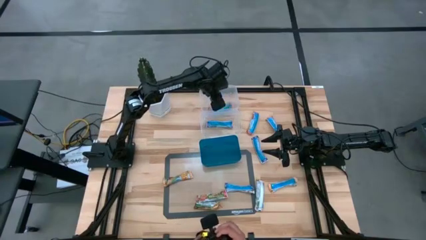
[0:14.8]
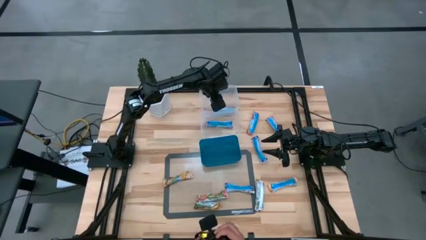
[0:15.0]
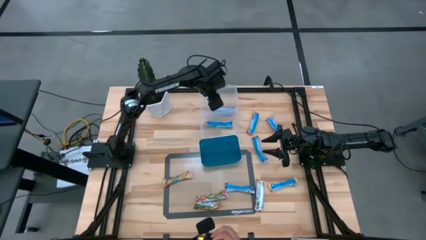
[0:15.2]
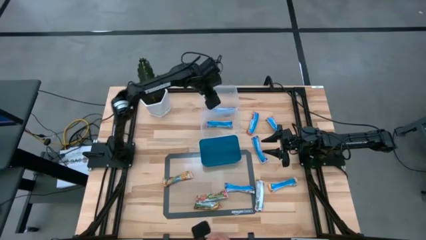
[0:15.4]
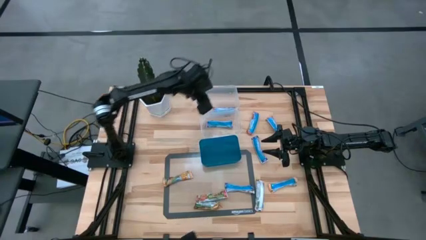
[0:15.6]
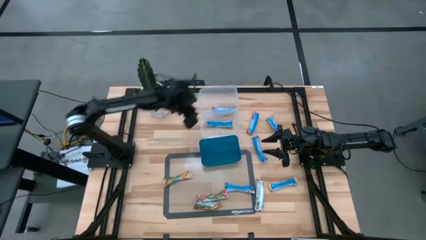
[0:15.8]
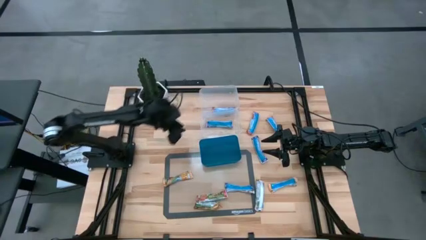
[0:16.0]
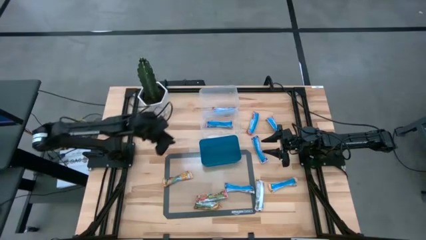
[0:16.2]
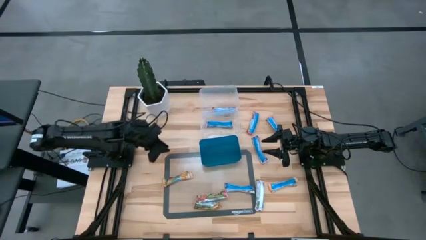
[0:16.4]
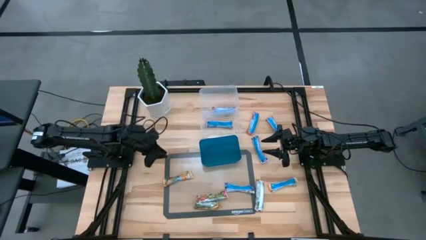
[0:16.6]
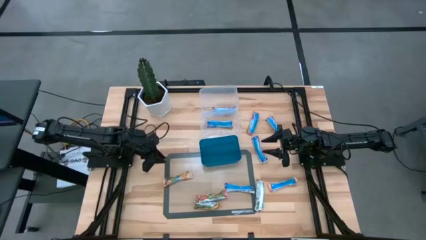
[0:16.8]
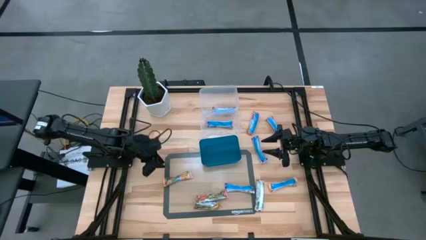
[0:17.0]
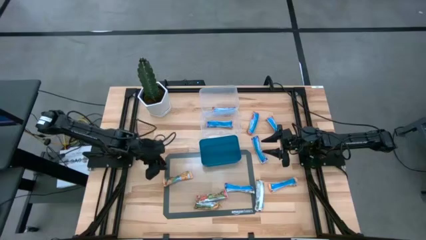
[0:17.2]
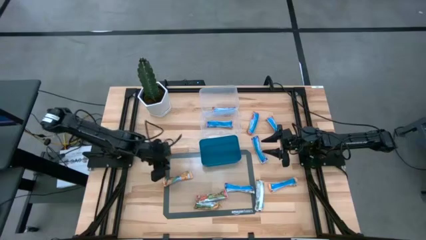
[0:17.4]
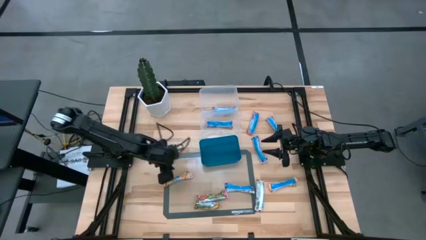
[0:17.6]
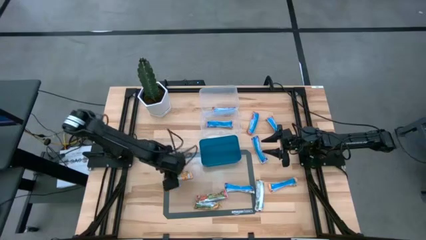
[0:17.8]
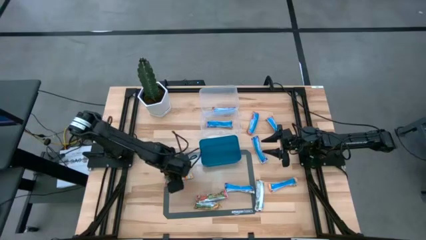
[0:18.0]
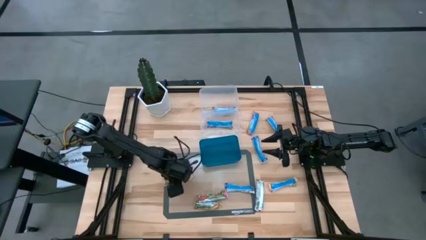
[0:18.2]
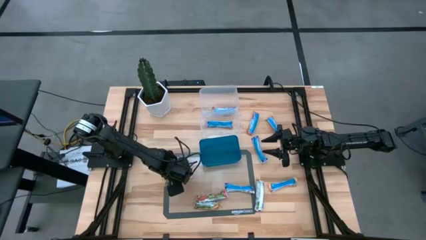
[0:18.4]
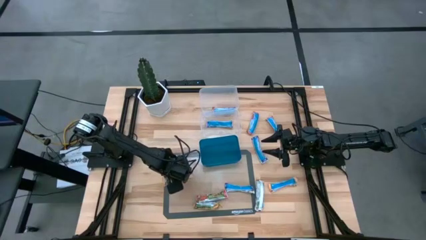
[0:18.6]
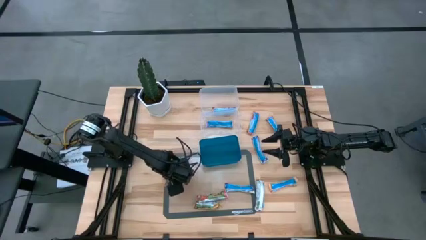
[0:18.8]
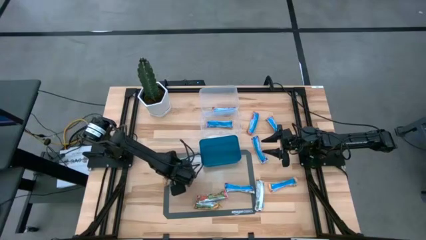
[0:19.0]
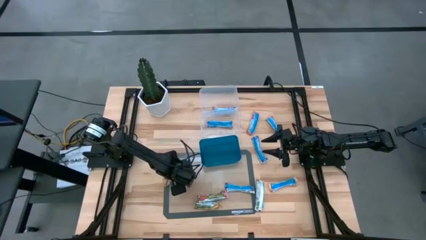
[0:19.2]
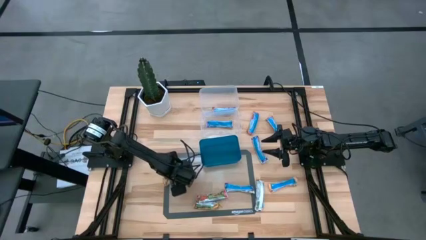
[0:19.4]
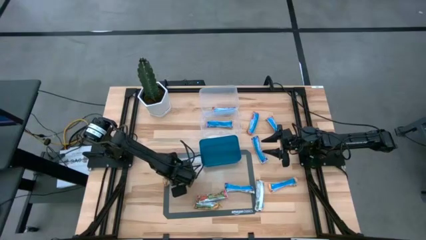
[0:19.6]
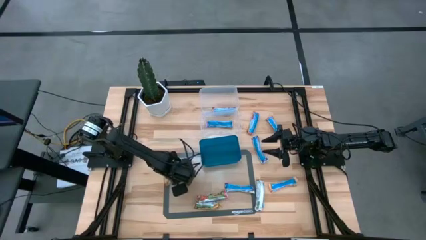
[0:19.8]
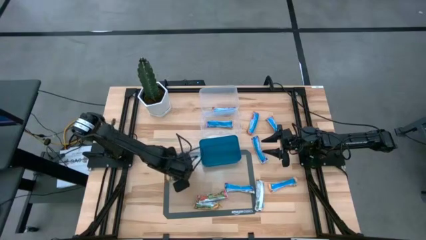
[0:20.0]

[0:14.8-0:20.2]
Task: Pick and place Granola Bars by type
Put the yellow granola bar into the top transparent bin

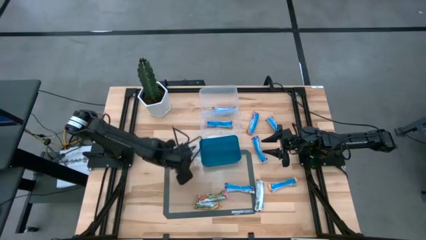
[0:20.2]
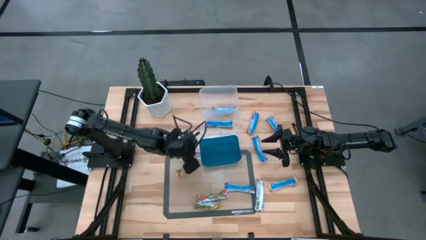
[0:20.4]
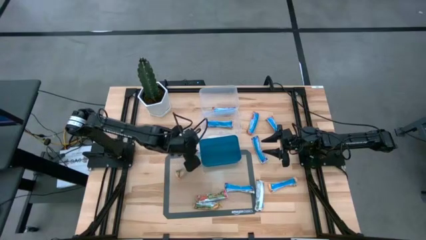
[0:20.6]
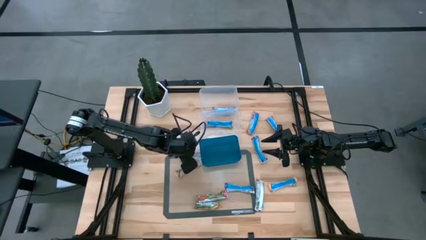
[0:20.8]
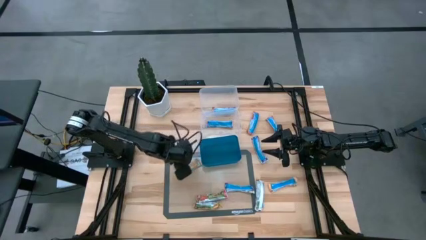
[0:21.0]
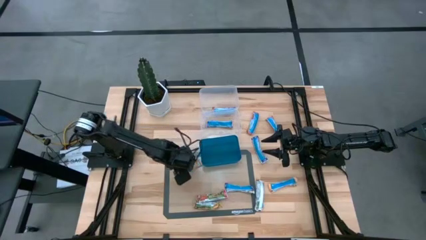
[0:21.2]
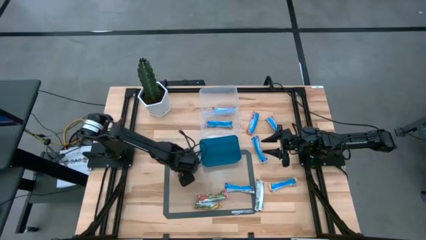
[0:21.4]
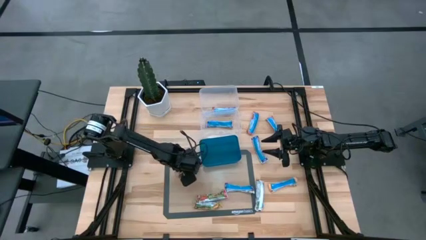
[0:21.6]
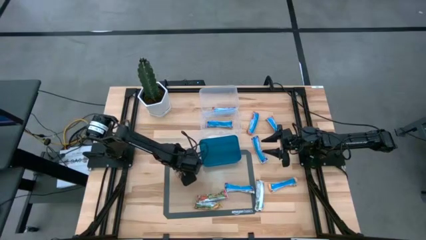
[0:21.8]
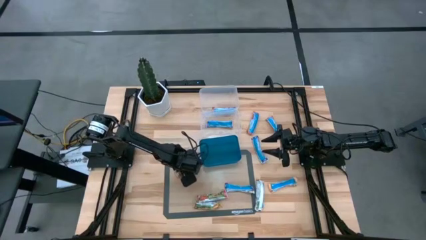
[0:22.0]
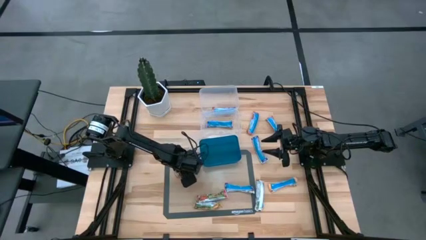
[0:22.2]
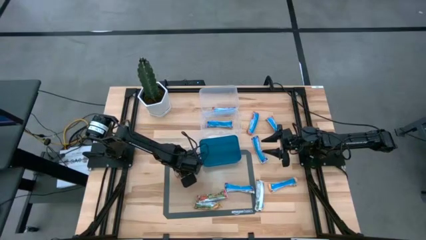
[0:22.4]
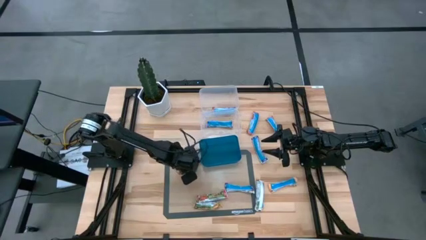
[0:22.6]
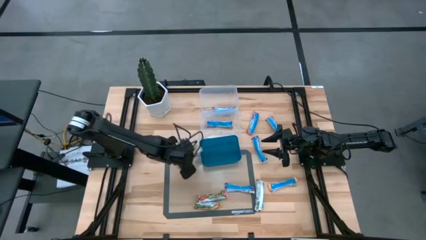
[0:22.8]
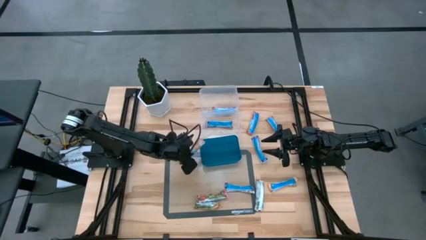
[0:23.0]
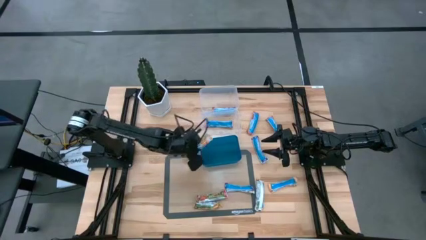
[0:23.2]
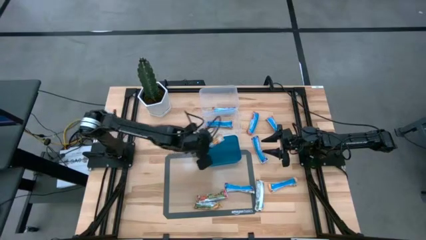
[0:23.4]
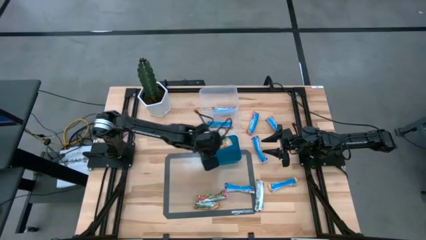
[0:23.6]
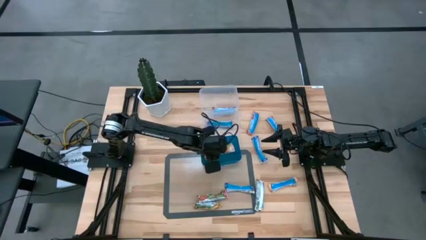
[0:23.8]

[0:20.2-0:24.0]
Put the yellow granola bar into the top transparent bin

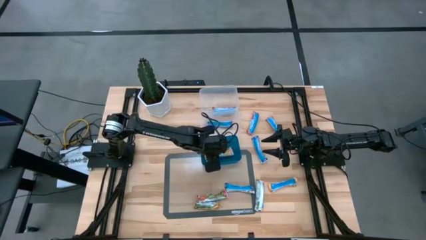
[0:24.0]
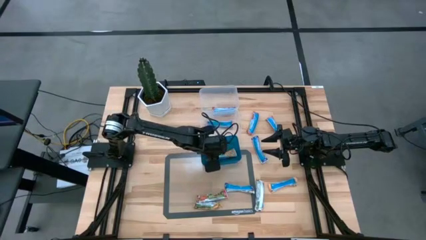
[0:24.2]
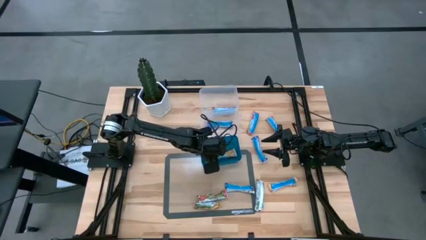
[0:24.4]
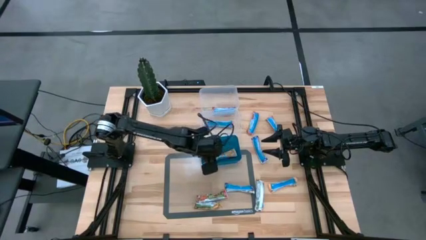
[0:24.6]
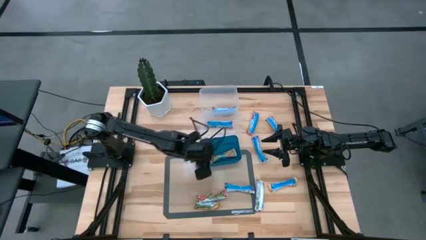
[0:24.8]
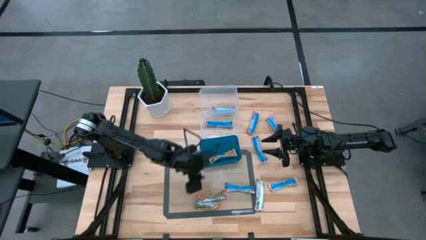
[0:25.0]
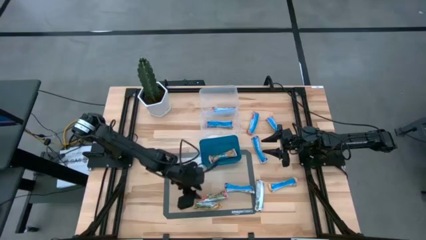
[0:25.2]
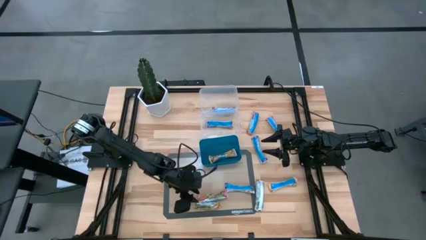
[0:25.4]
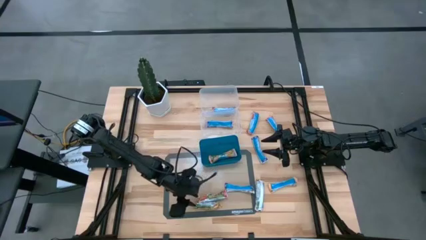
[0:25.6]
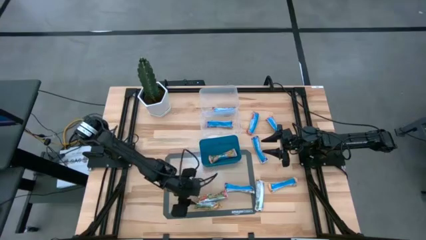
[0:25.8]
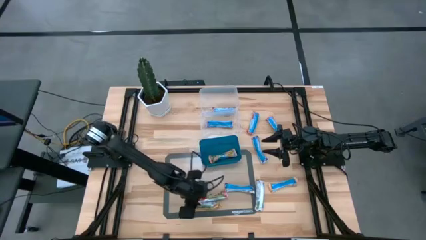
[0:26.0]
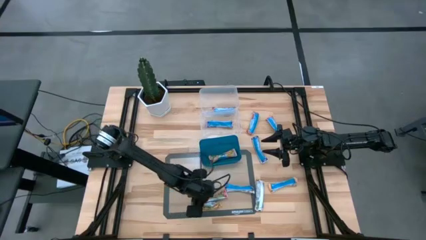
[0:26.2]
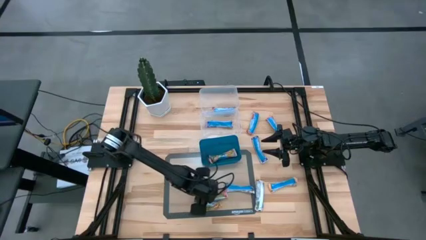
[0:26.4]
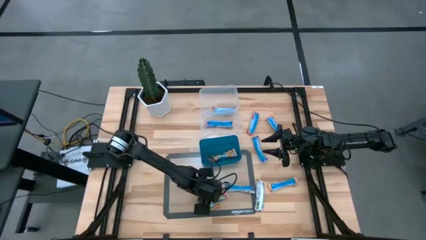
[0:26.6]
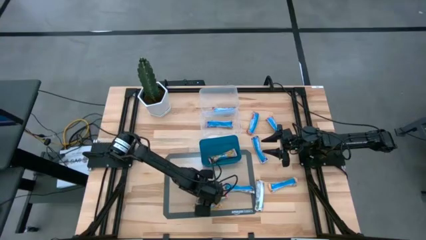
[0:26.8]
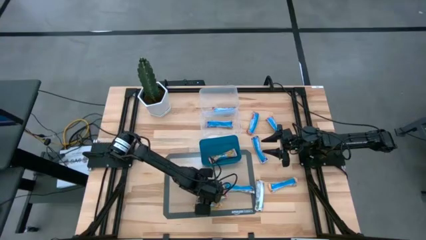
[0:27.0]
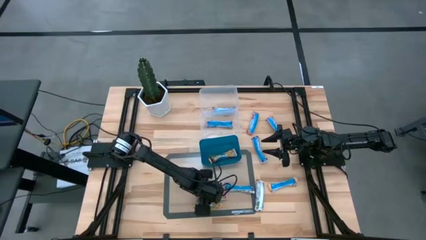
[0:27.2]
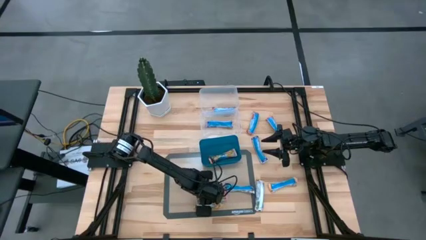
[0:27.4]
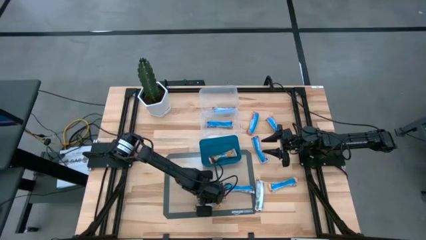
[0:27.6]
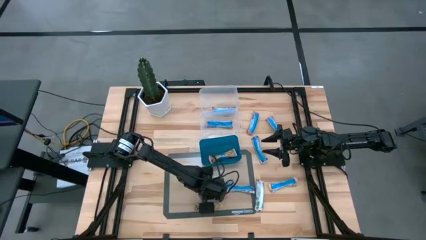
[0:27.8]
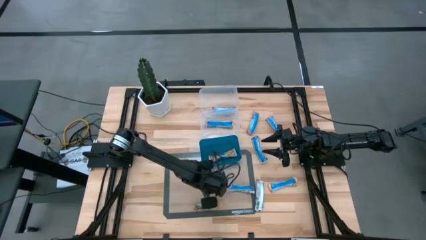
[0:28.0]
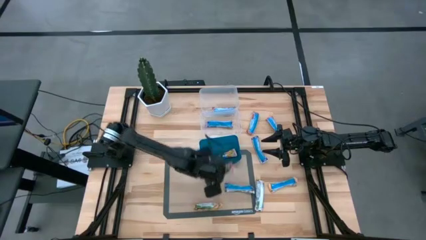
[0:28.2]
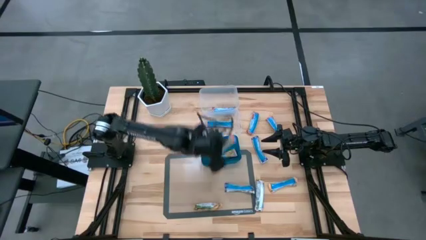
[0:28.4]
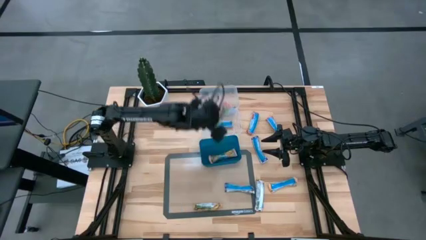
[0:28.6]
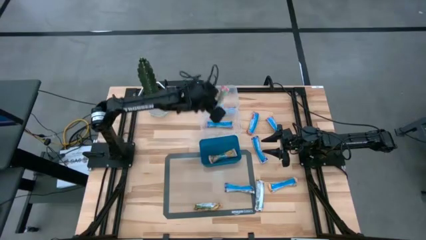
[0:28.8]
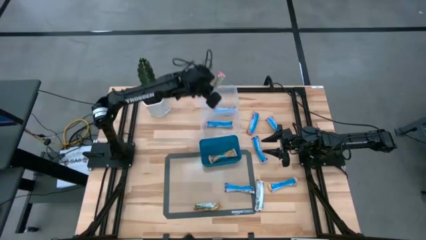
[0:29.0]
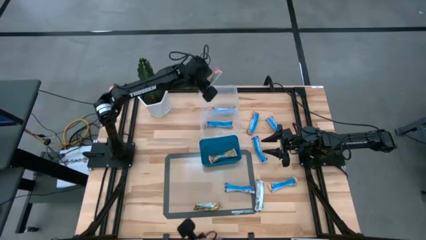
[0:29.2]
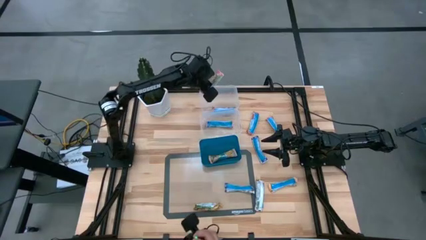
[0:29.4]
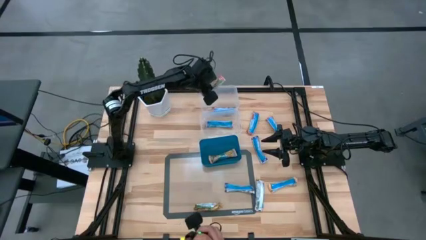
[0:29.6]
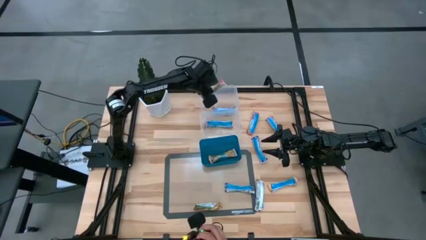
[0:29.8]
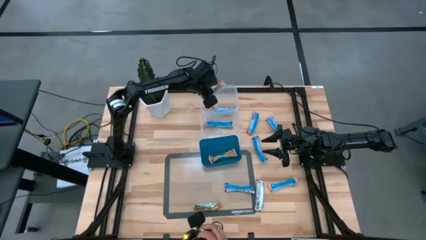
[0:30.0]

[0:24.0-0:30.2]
Put the red granola bar into the top transparent bin
